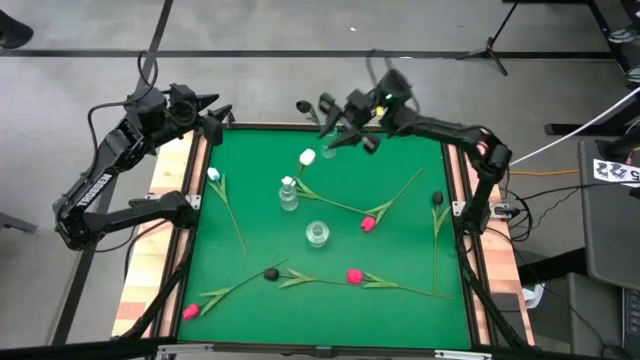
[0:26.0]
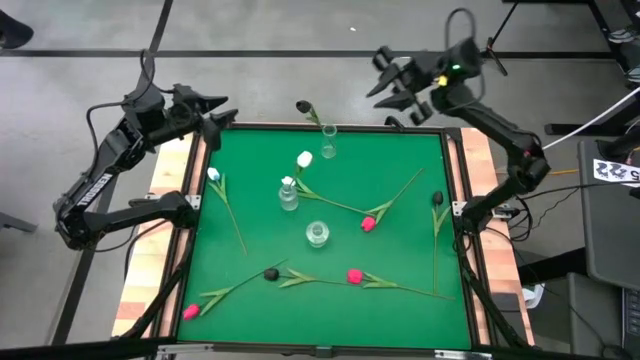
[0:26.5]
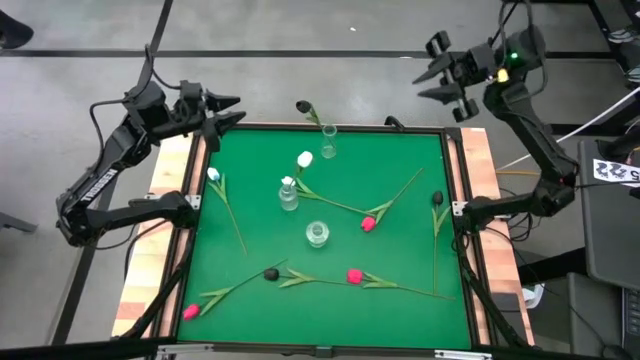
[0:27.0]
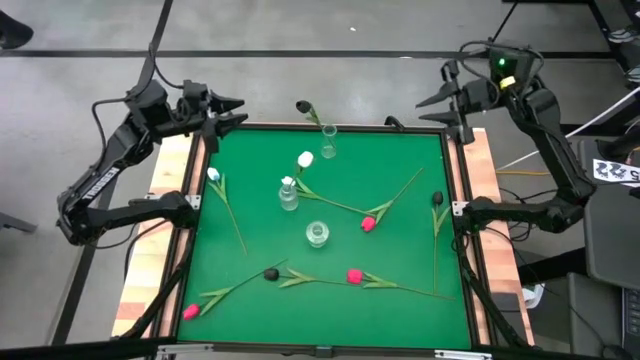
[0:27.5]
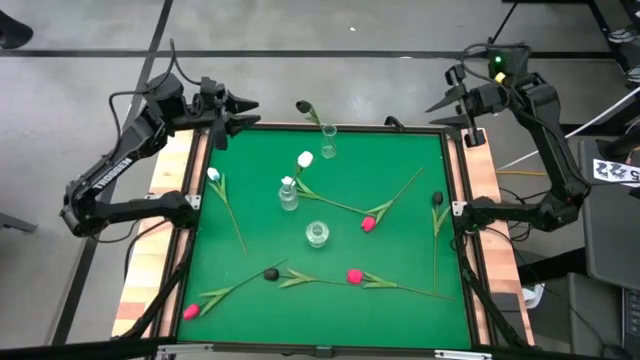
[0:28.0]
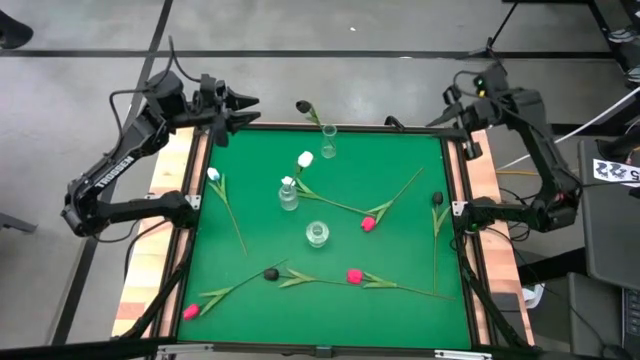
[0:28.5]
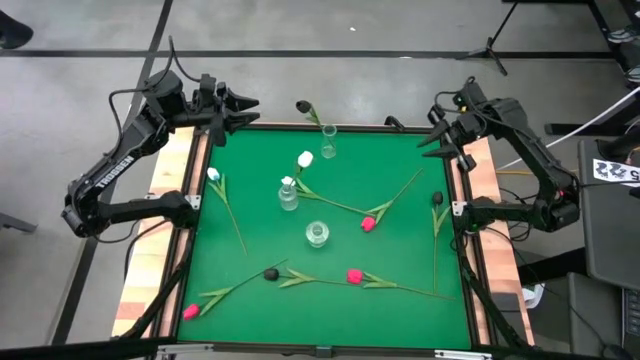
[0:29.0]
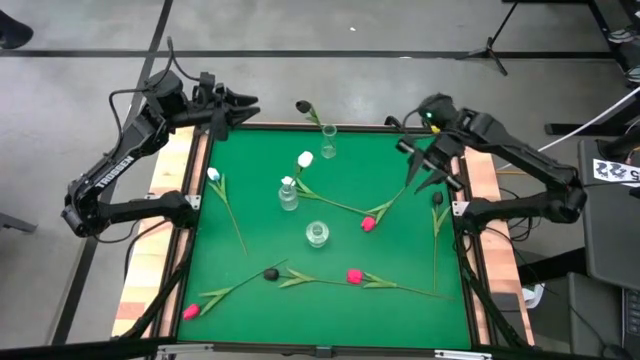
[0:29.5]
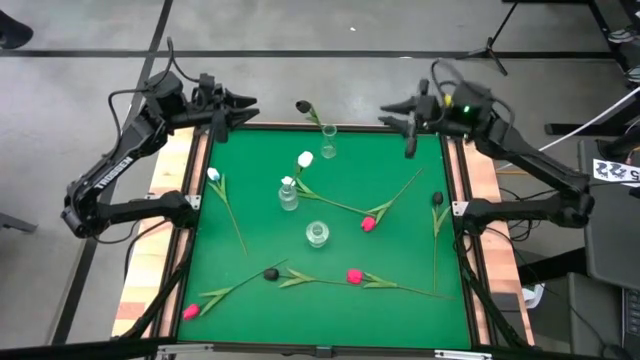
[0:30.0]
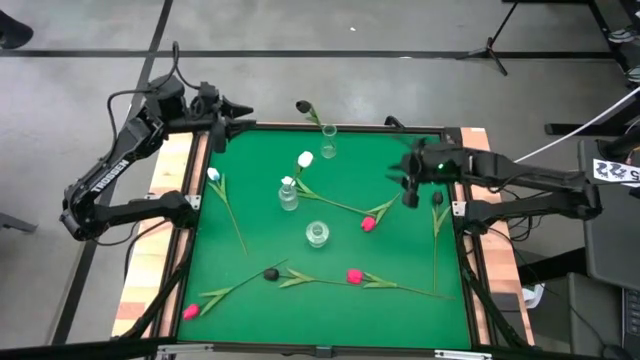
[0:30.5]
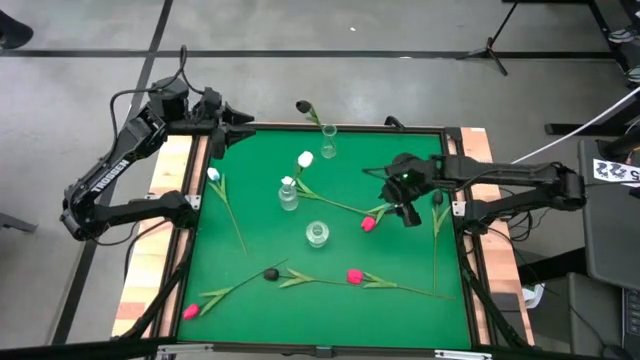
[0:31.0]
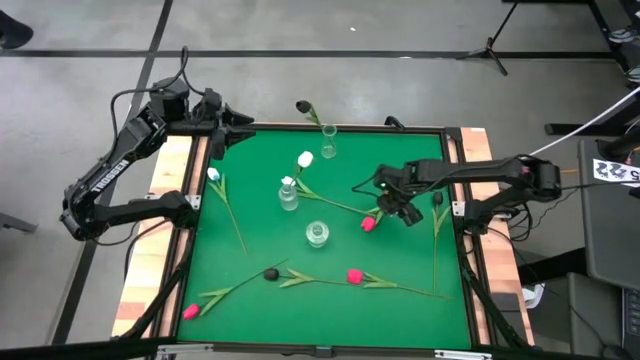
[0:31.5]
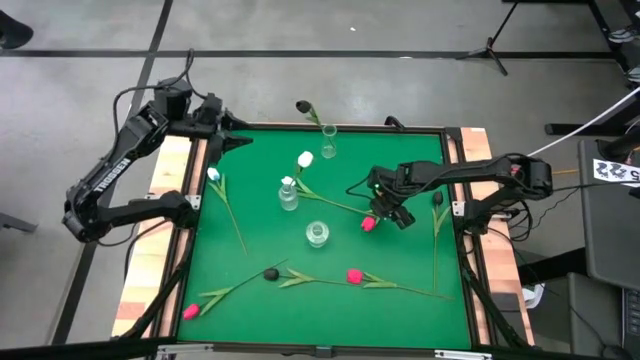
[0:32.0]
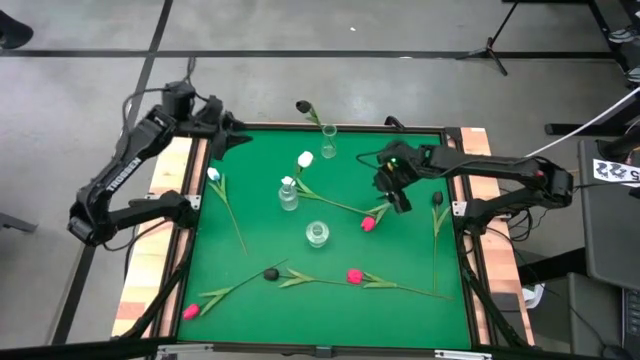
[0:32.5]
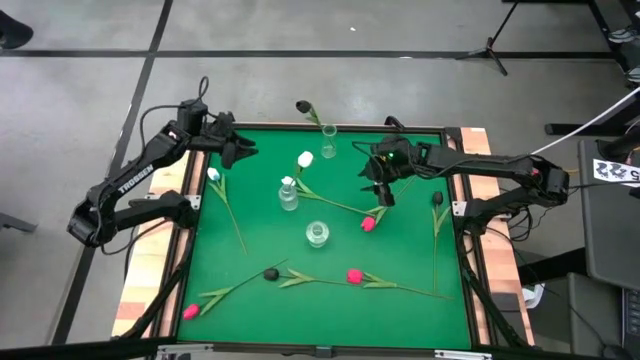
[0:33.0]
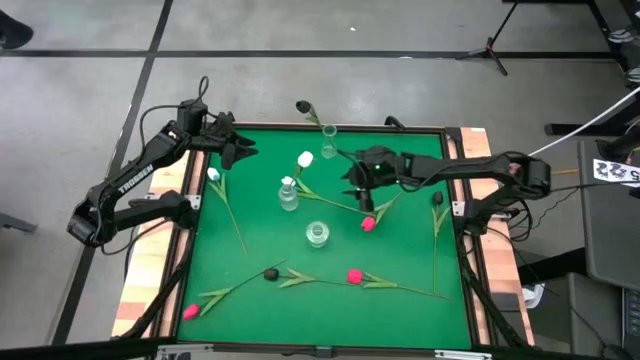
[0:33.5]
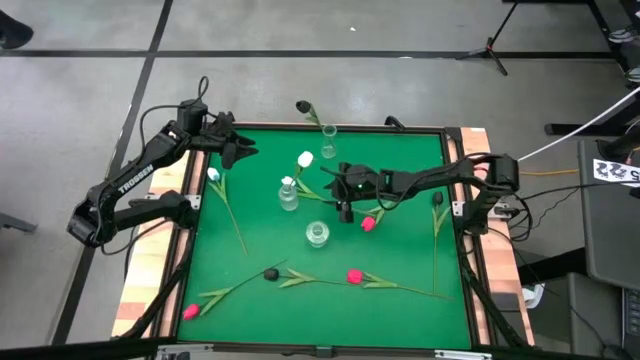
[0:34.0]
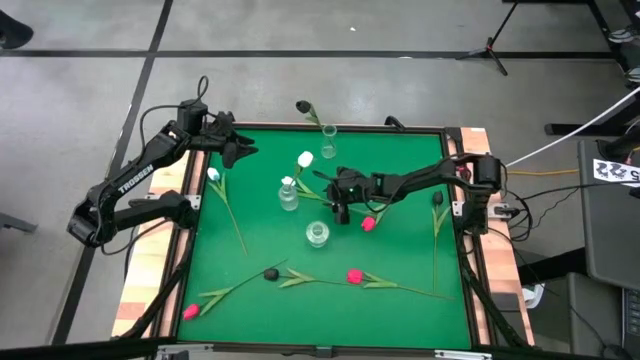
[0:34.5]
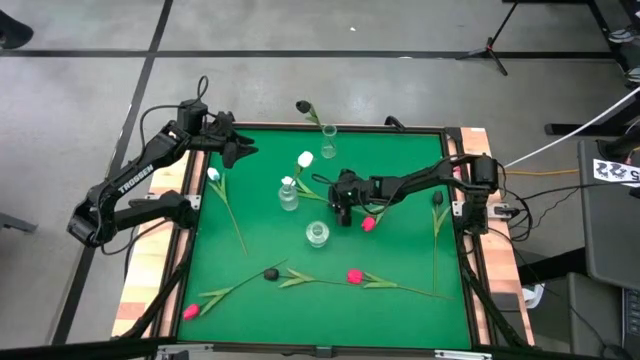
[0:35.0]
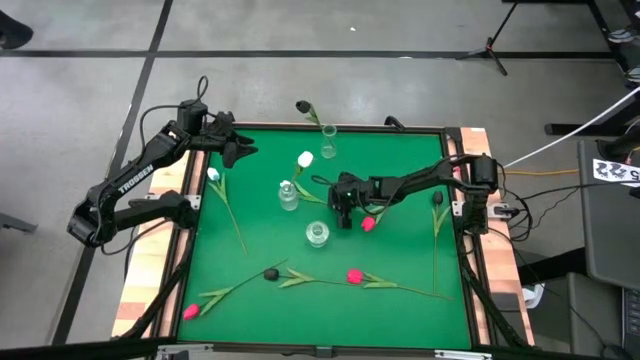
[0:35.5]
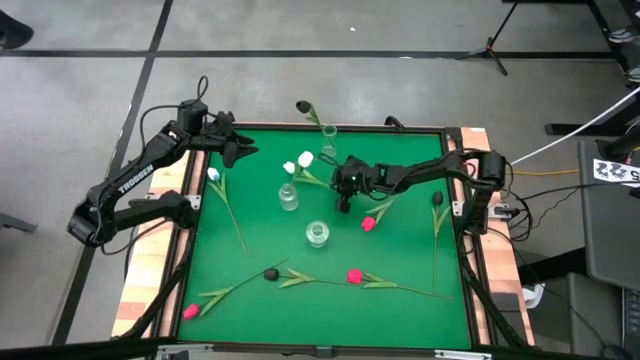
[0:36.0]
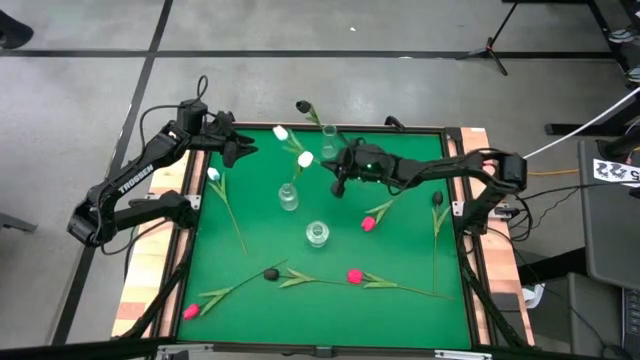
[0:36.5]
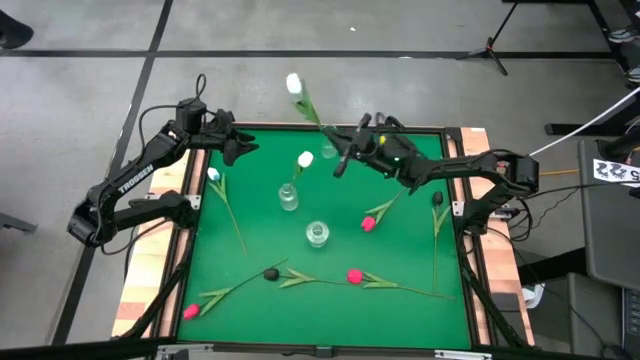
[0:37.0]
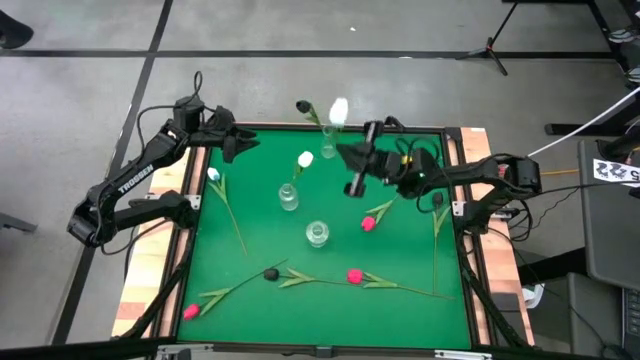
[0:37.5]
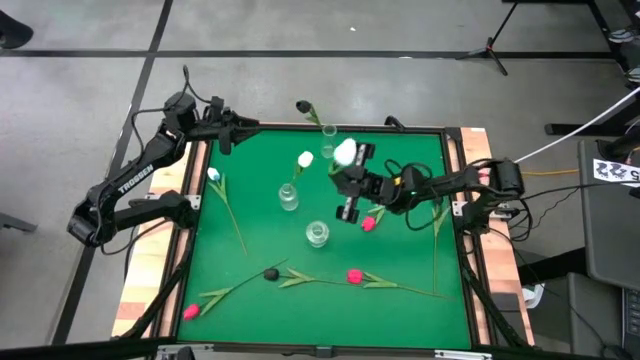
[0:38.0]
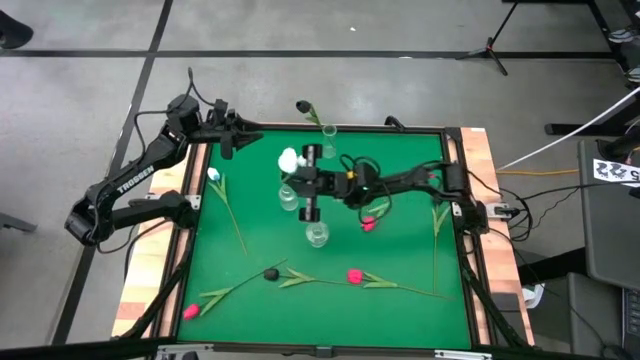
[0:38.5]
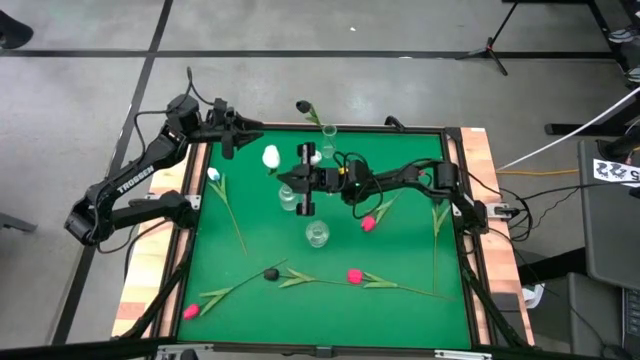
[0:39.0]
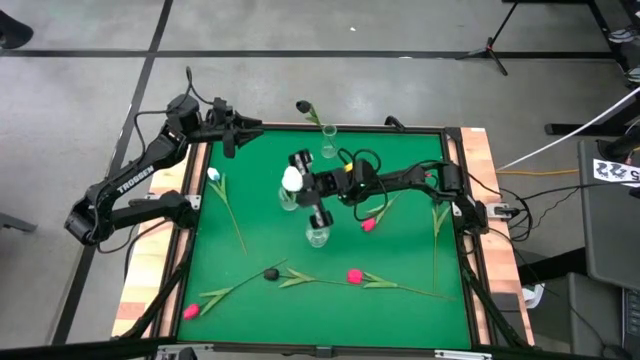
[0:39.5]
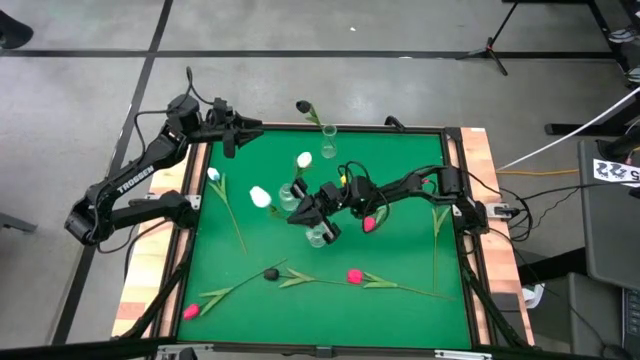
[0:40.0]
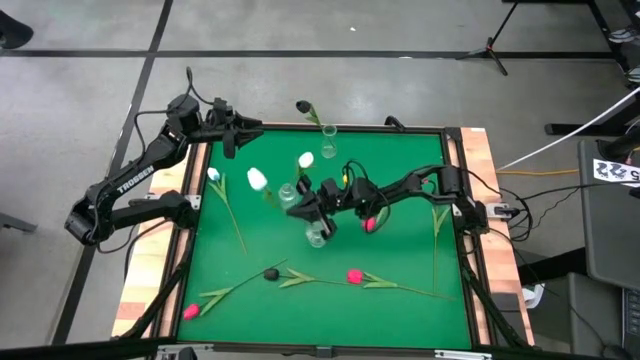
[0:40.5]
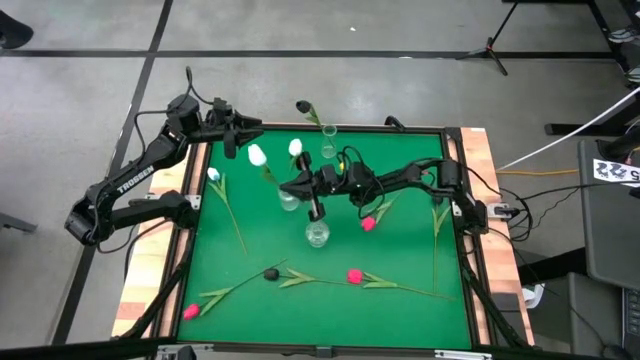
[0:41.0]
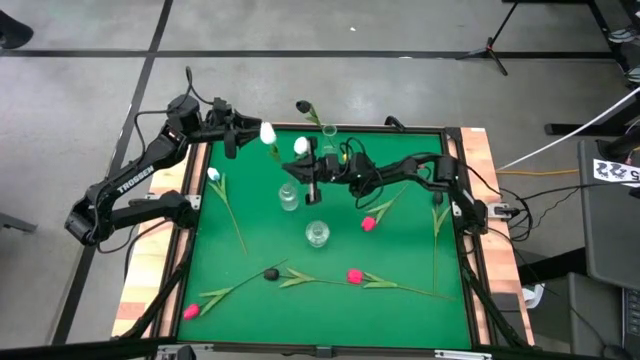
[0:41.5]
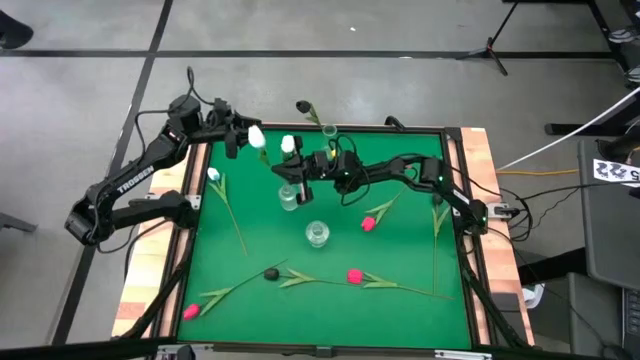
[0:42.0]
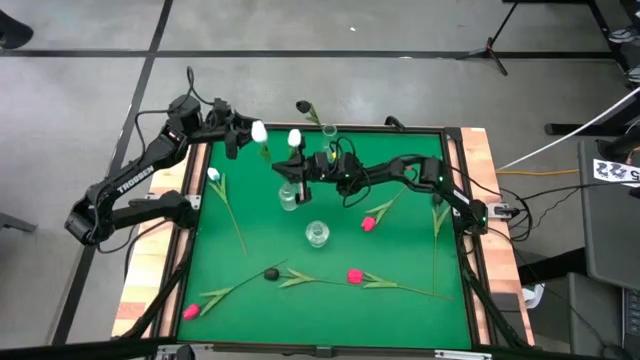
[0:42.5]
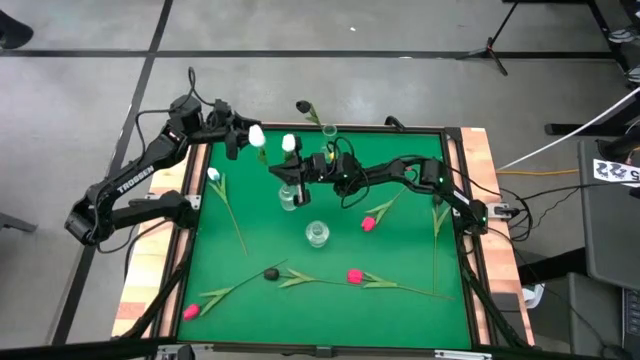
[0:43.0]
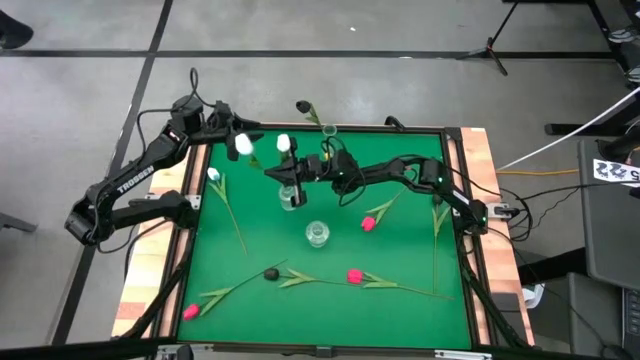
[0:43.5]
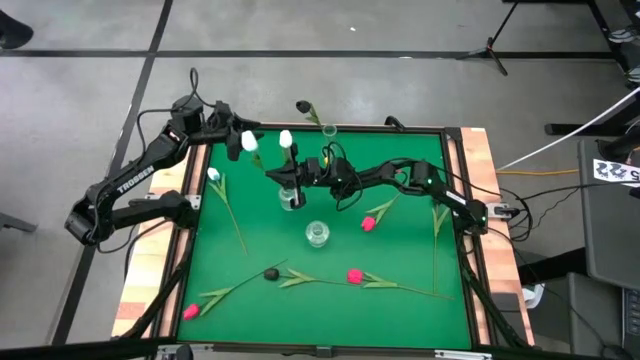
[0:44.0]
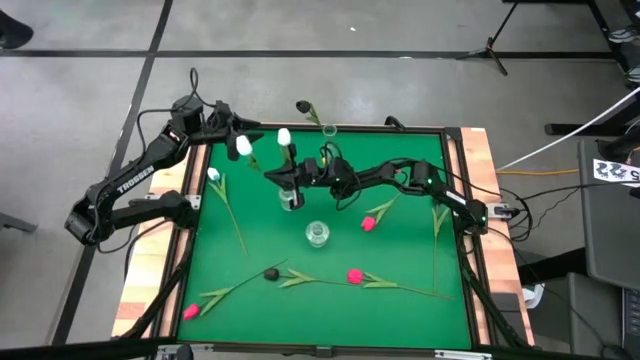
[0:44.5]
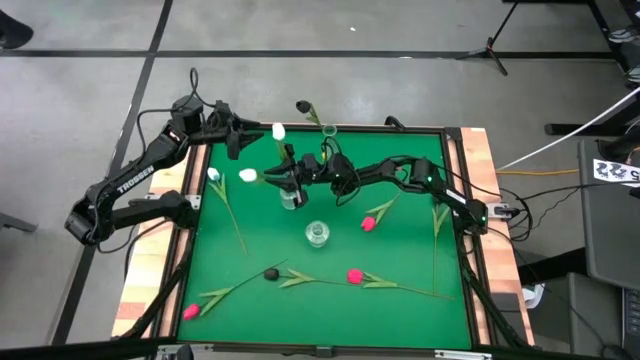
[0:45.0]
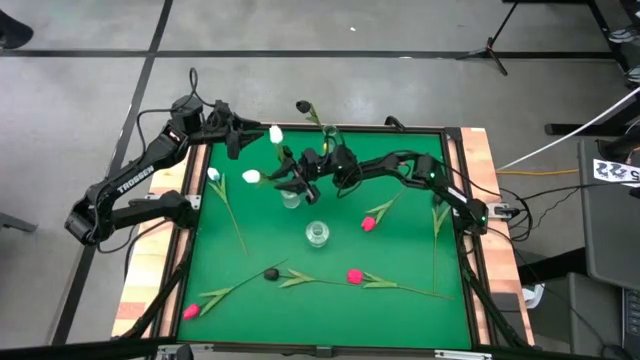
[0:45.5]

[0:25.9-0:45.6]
Task: Sort flowers into vase by color
Put the right white flower into the middle transparent vase

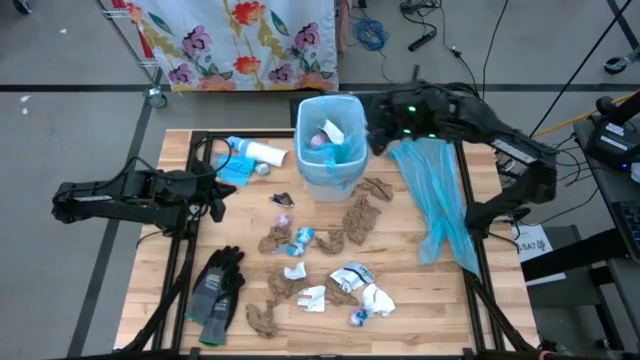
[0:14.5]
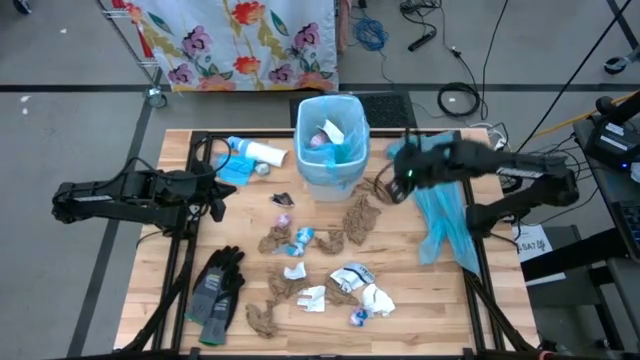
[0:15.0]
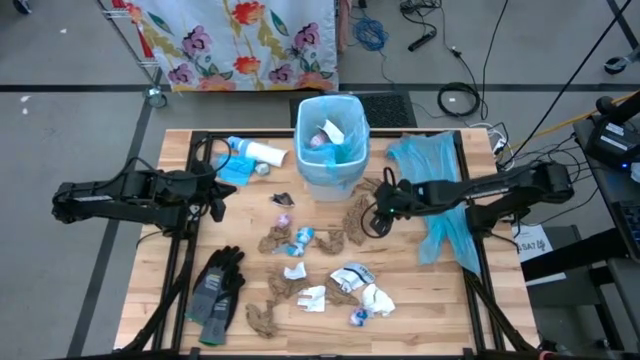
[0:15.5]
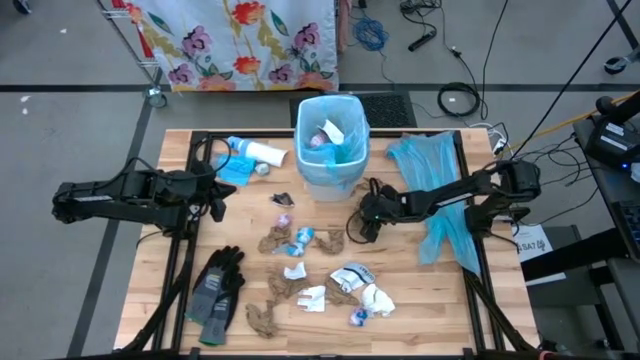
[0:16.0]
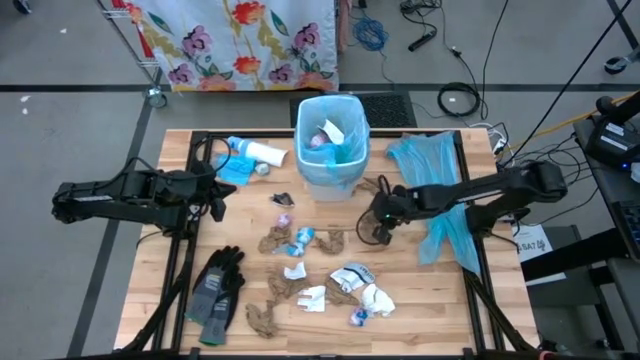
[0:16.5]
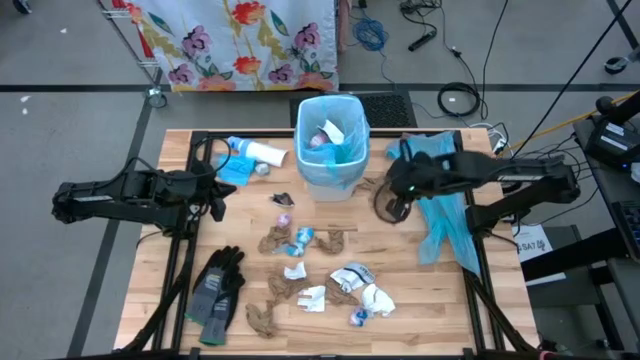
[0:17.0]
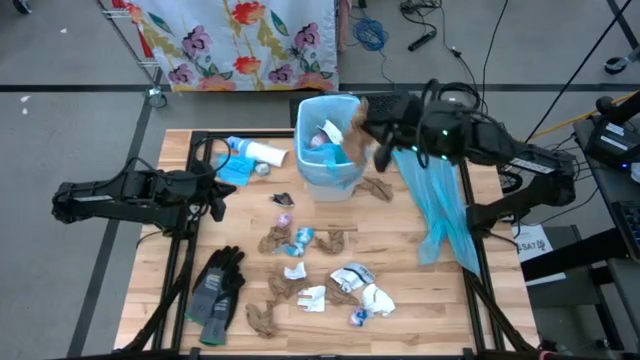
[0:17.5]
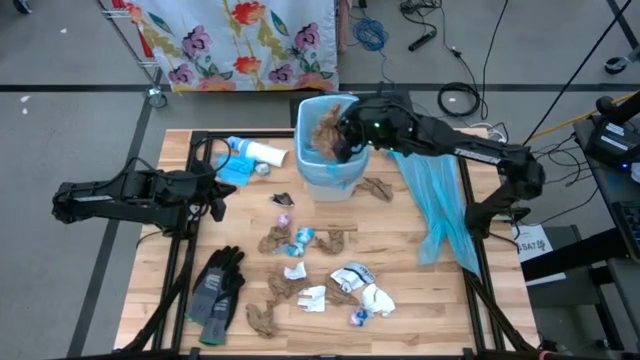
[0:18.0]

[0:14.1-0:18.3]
Task: place trash/remove bag and relplace
Put the brown napkin into the trash bin
